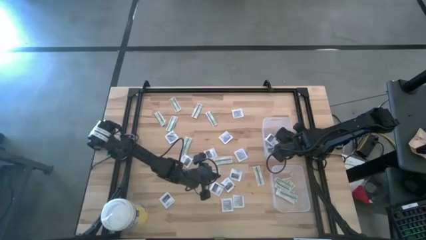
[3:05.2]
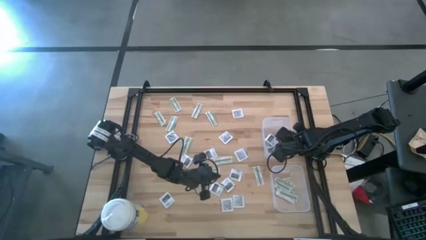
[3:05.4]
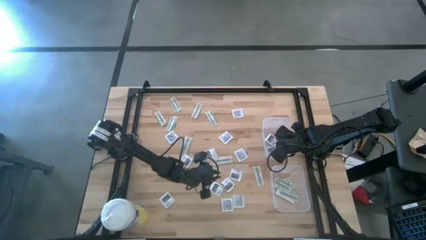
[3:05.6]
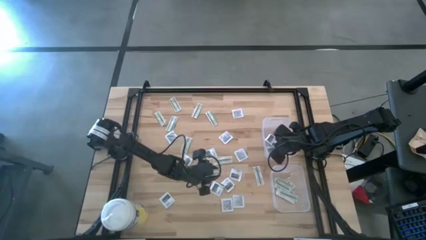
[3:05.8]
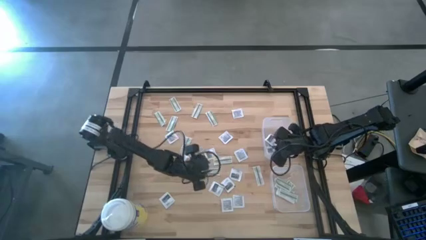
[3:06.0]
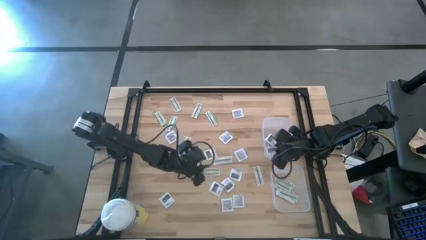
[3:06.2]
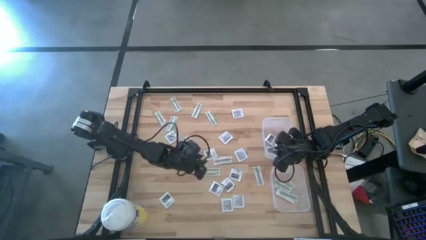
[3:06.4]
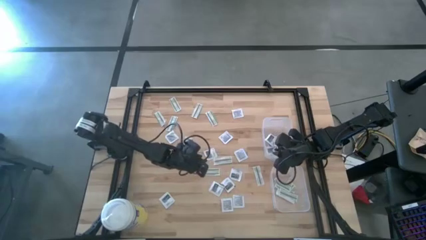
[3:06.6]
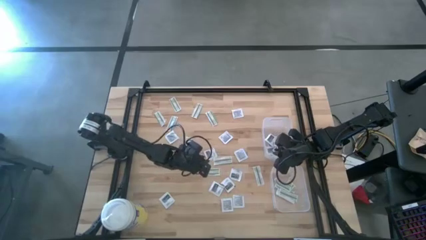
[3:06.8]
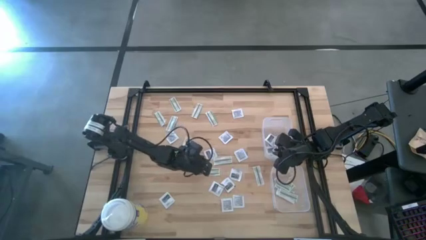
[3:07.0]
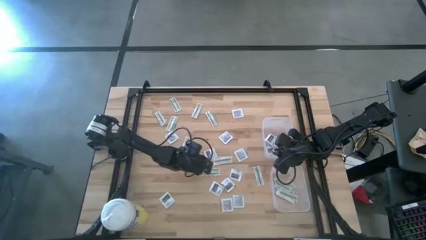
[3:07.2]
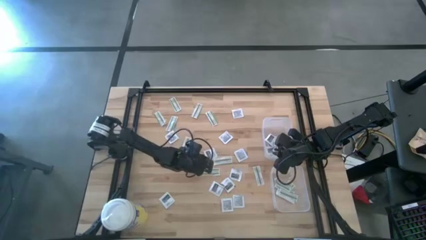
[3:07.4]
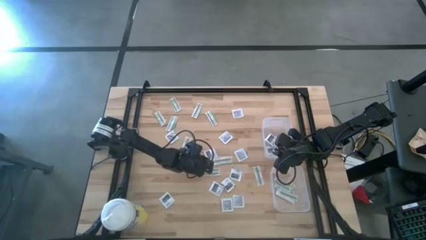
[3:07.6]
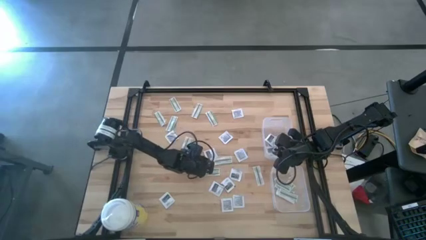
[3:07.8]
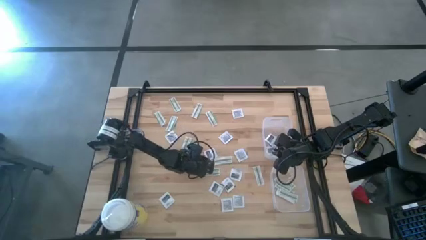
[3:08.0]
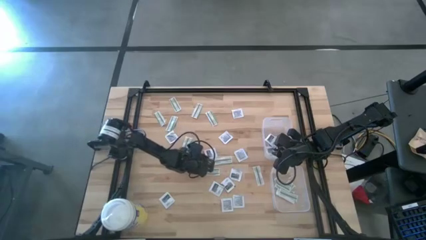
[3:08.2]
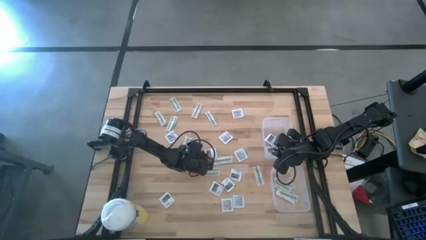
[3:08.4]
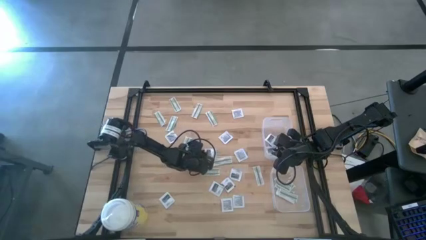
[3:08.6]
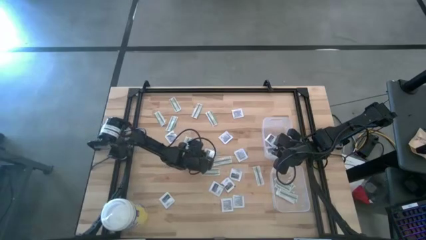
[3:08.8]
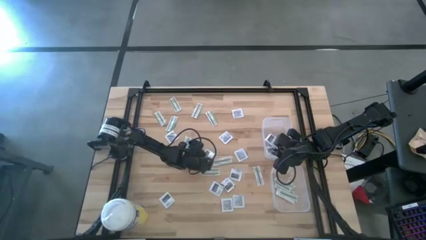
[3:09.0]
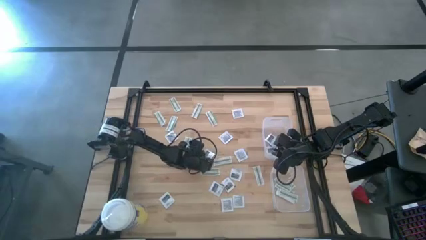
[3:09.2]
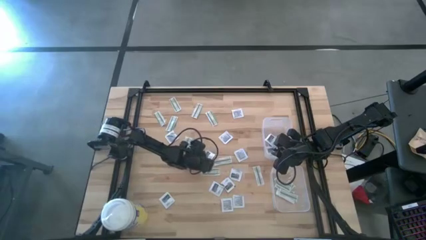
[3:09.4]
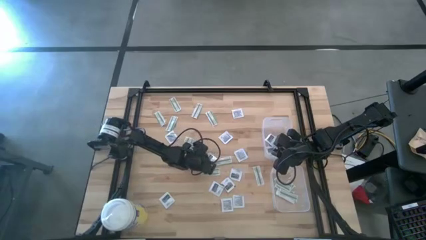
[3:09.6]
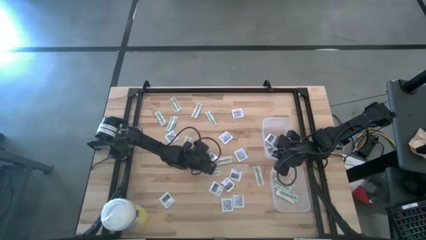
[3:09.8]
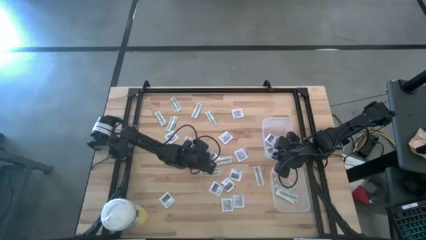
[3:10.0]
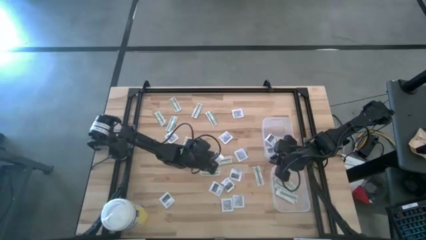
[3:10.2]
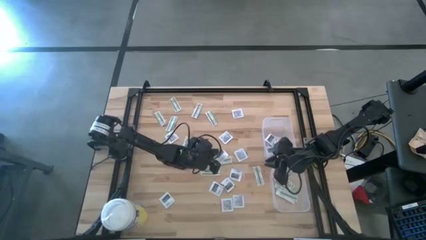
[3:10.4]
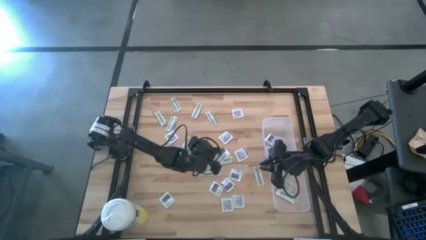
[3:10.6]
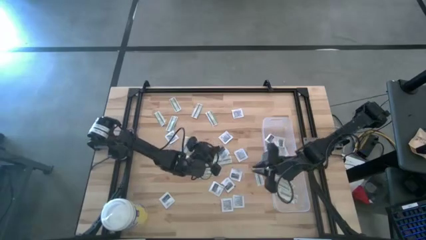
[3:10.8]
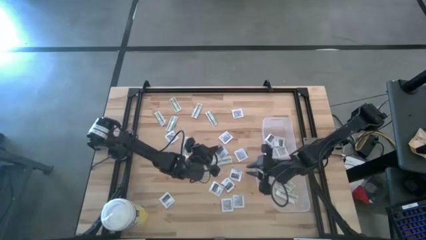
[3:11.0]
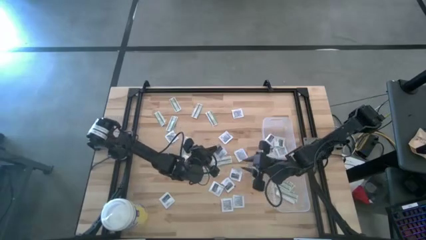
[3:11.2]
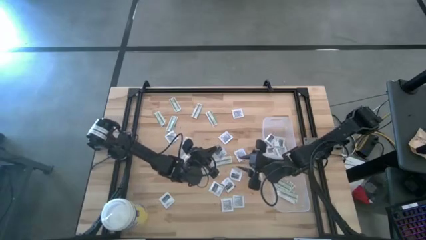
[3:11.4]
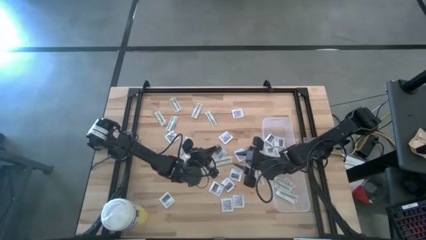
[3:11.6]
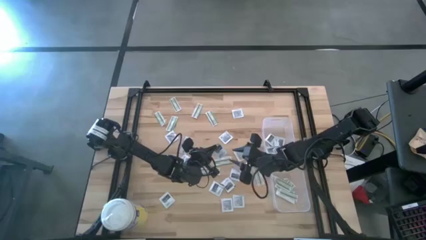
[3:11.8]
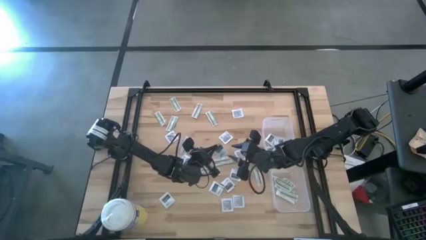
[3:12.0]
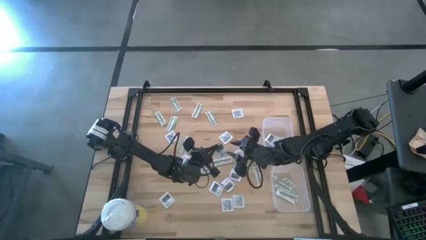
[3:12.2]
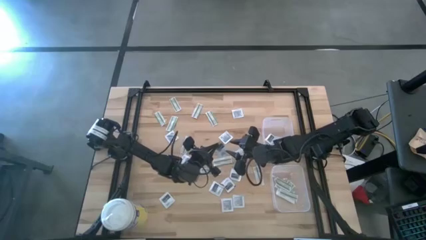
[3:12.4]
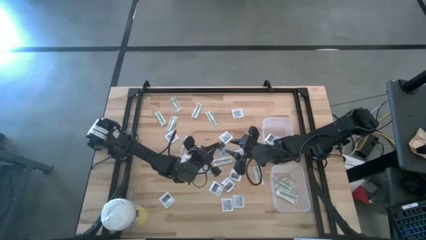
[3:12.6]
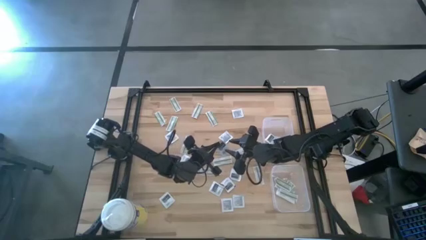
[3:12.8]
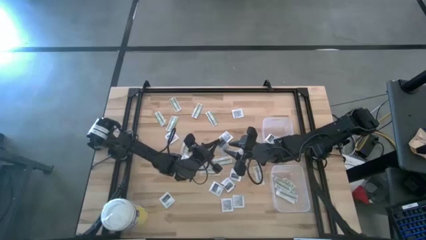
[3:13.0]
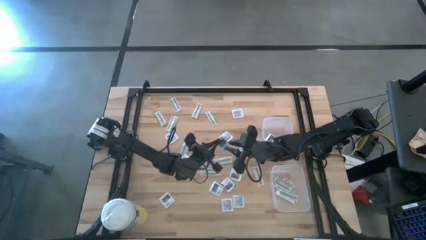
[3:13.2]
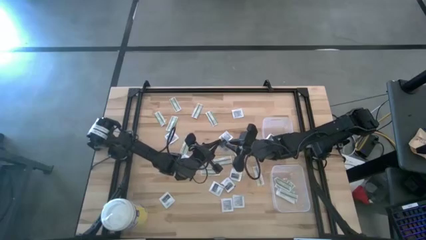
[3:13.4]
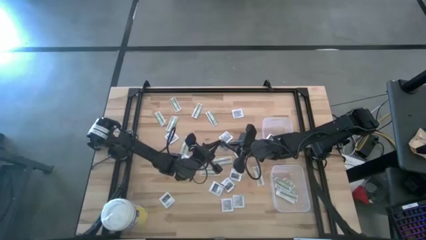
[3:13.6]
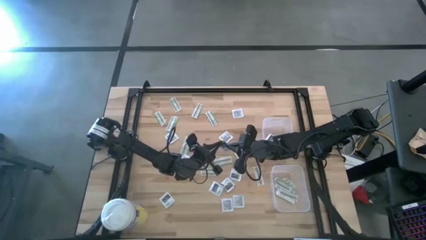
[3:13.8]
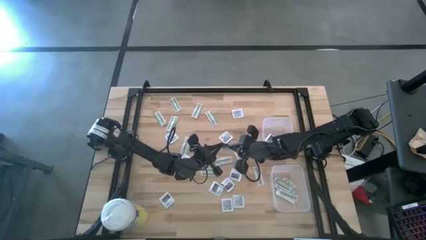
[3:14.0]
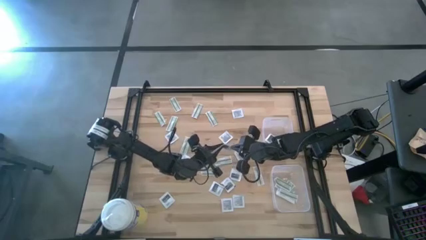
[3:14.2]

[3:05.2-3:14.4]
Task: Pick & Place First Aid Supplies
Put the towelette pack into the top bin

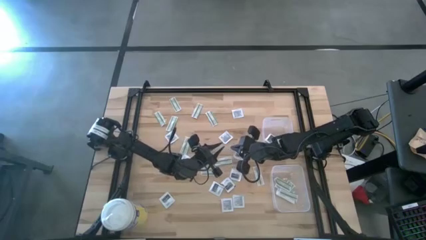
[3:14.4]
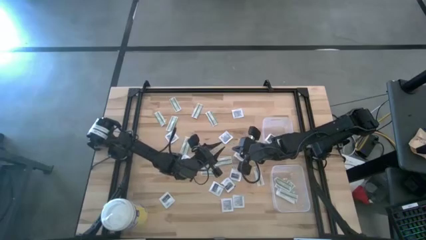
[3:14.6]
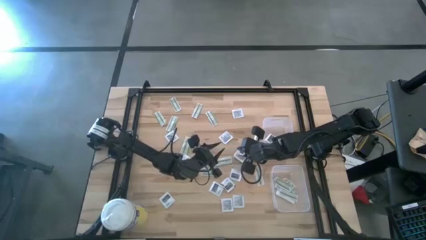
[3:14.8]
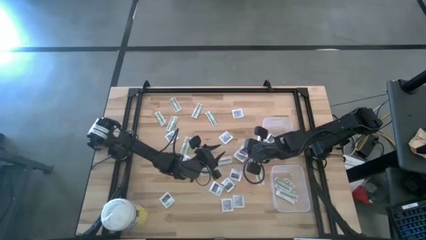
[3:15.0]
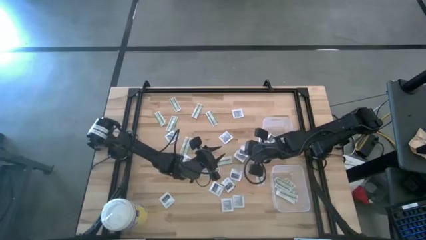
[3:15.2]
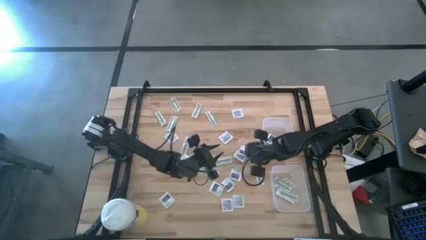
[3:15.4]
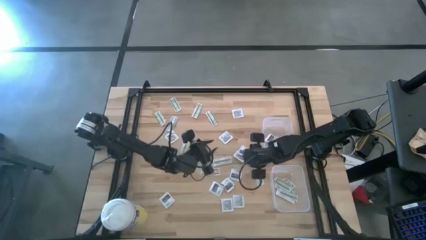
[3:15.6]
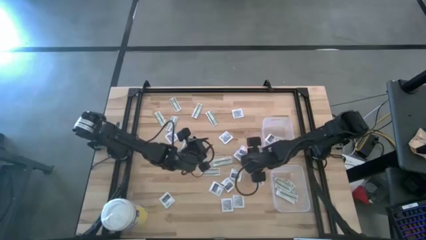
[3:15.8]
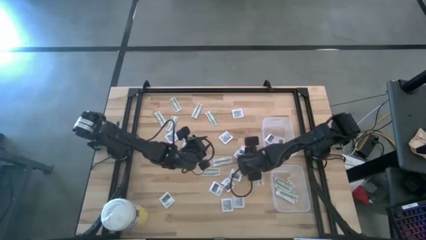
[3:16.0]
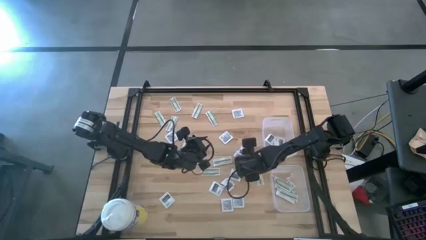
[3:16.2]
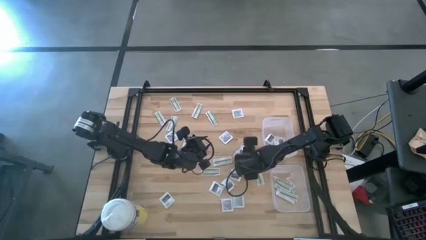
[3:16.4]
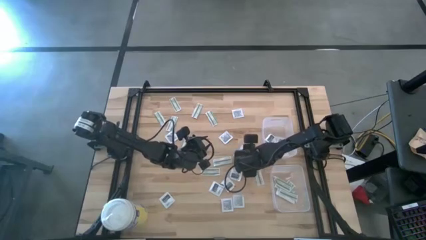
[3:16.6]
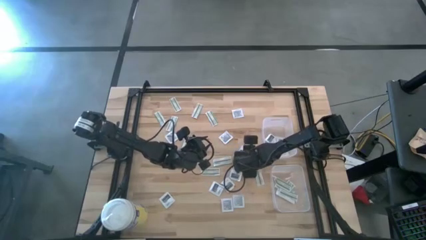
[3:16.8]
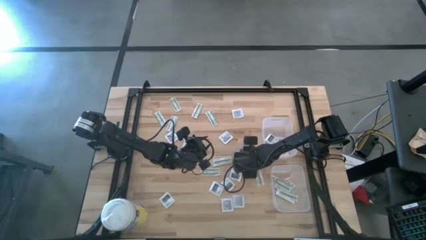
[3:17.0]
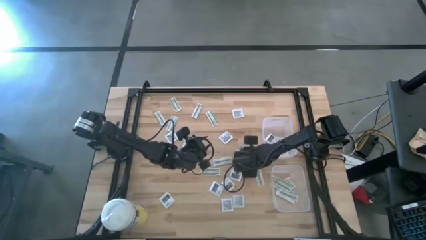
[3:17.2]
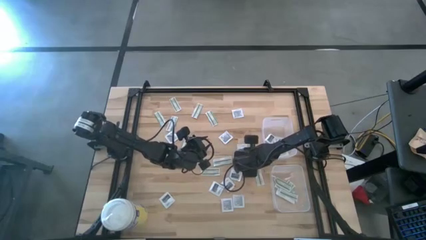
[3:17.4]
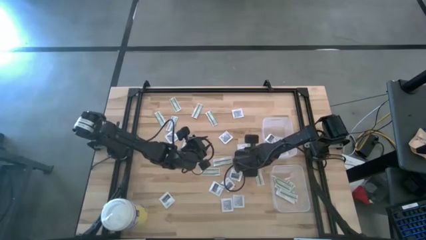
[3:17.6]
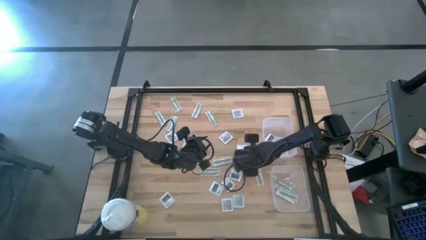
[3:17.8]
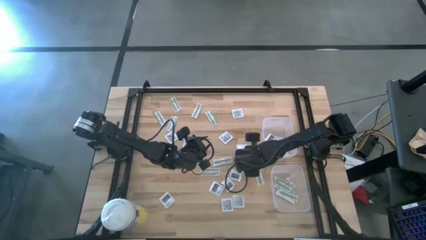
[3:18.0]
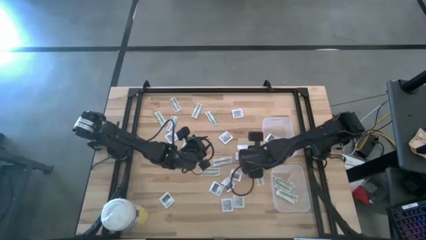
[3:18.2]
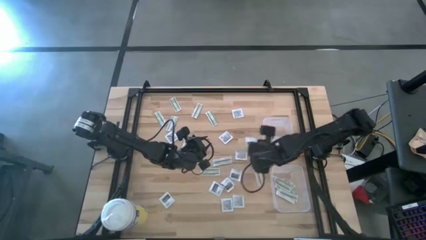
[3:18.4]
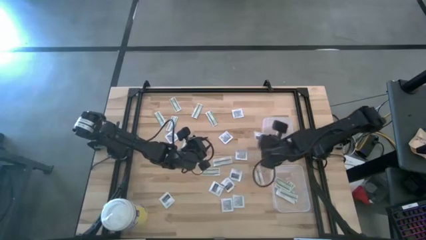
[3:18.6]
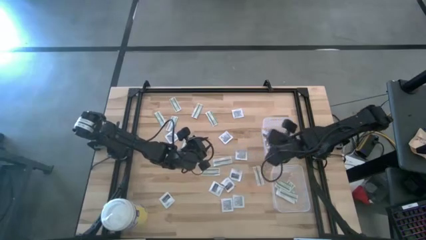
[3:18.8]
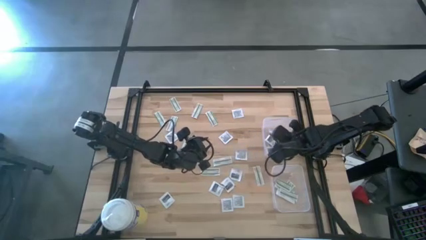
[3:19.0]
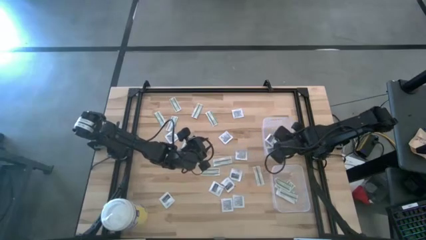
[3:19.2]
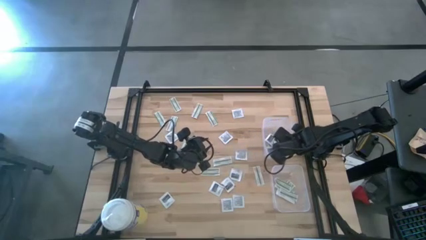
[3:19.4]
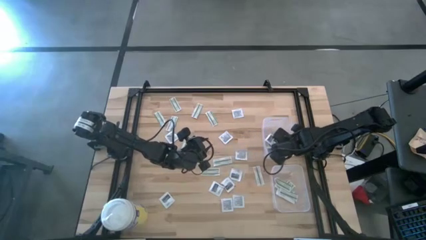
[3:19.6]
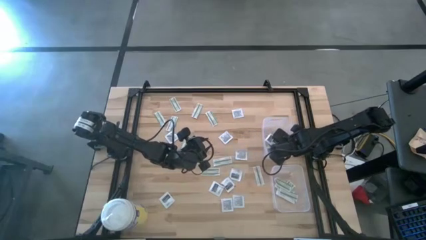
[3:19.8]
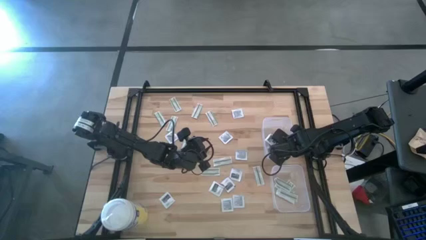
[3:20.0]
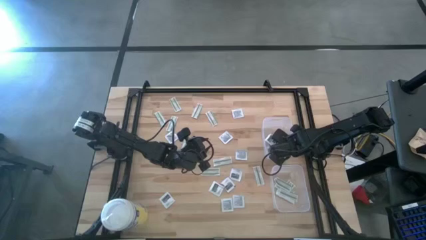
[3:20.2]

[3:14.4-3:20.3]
Put the towelette pack into the top bin
